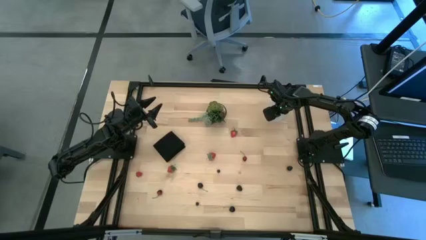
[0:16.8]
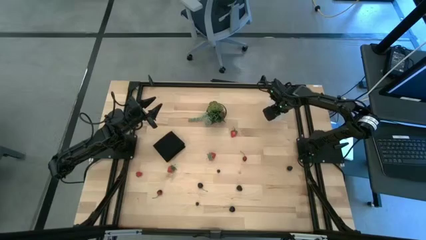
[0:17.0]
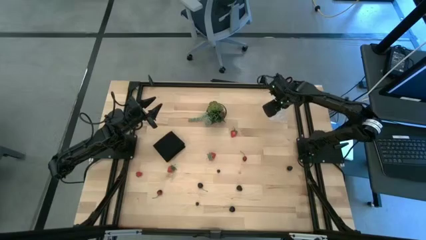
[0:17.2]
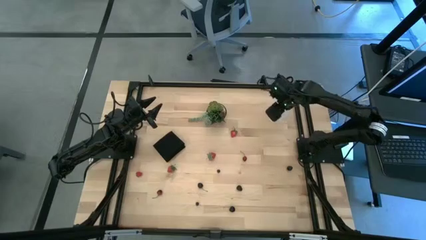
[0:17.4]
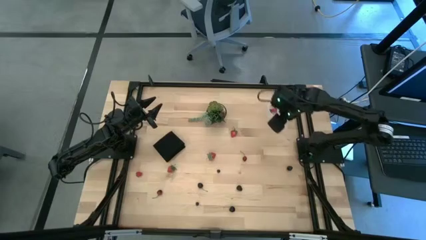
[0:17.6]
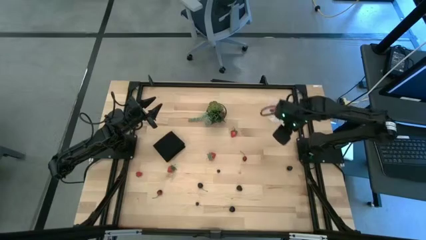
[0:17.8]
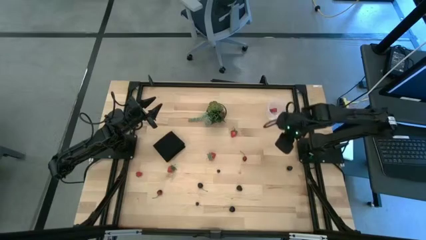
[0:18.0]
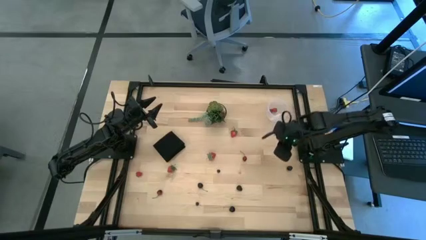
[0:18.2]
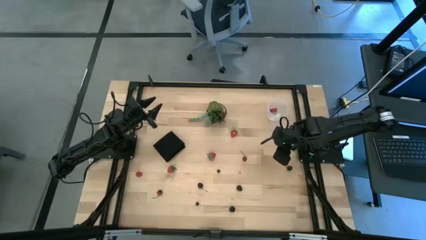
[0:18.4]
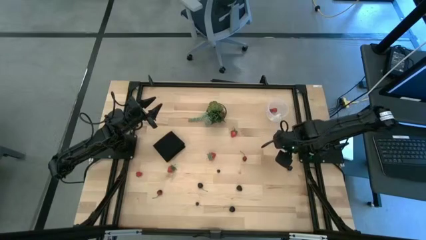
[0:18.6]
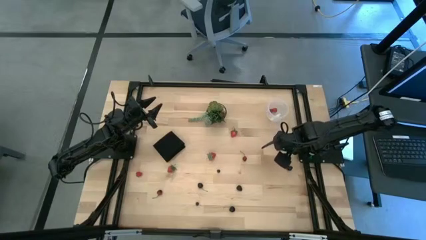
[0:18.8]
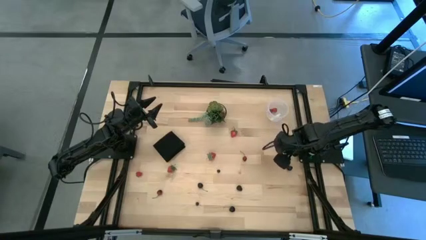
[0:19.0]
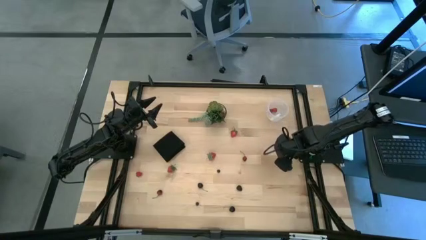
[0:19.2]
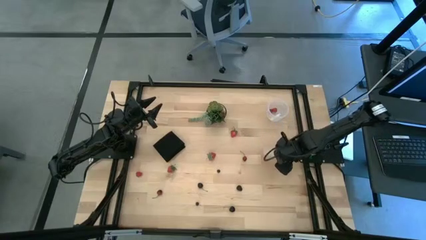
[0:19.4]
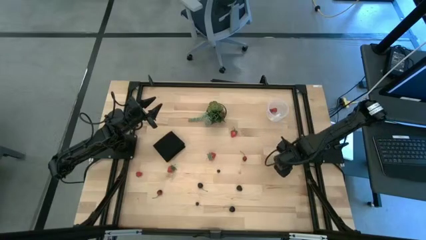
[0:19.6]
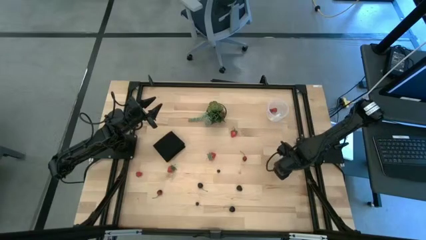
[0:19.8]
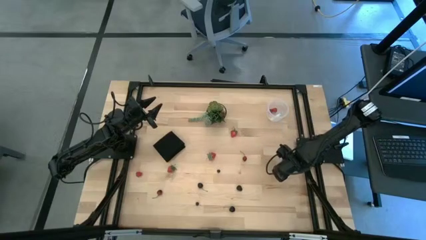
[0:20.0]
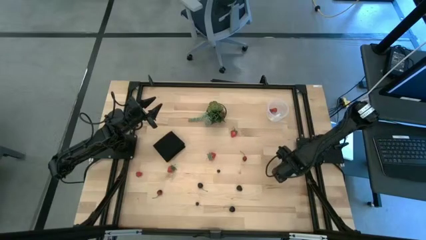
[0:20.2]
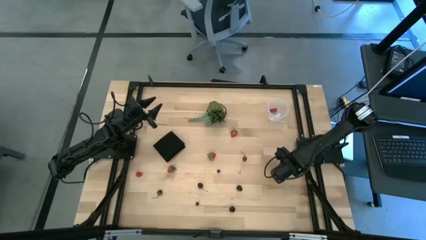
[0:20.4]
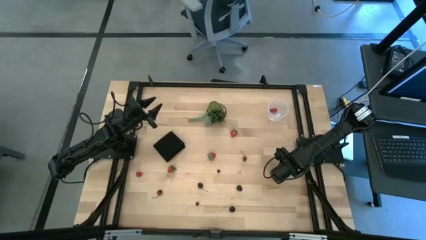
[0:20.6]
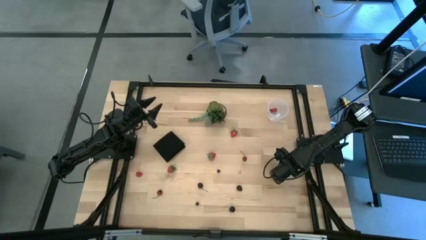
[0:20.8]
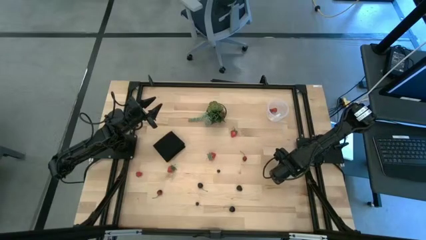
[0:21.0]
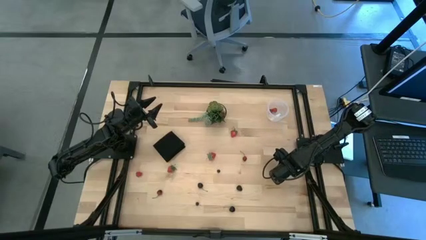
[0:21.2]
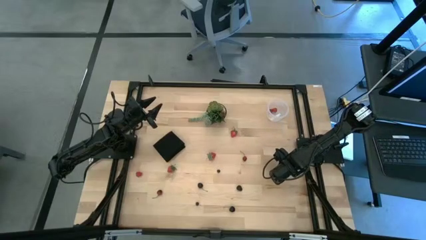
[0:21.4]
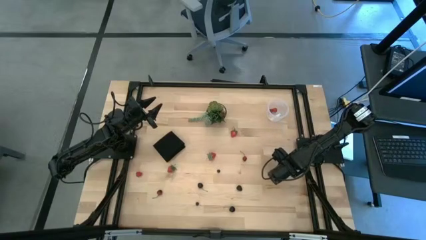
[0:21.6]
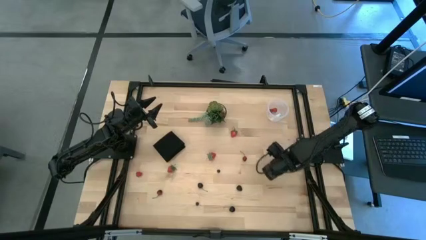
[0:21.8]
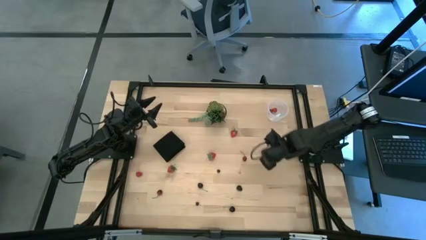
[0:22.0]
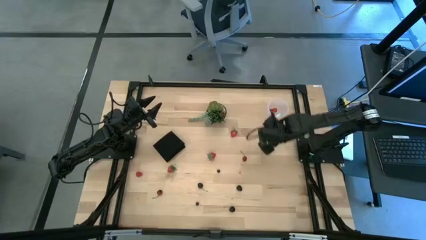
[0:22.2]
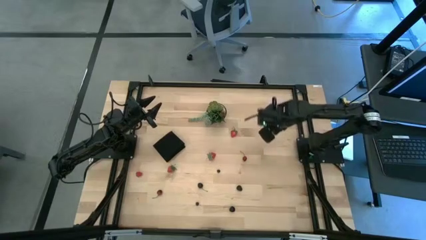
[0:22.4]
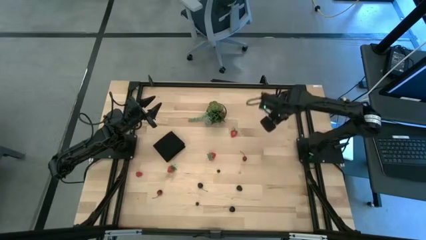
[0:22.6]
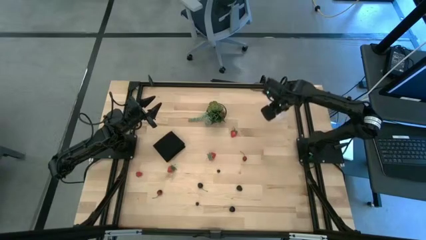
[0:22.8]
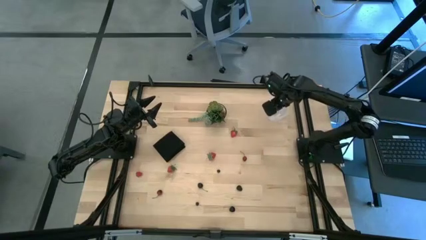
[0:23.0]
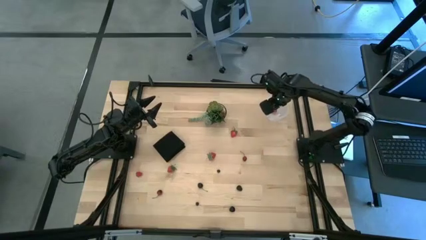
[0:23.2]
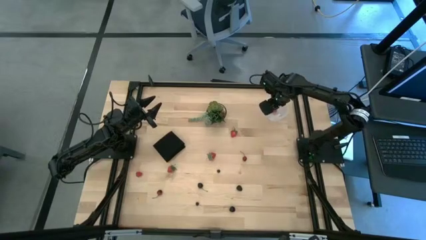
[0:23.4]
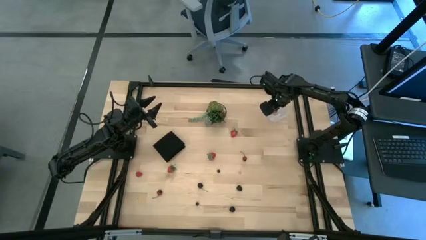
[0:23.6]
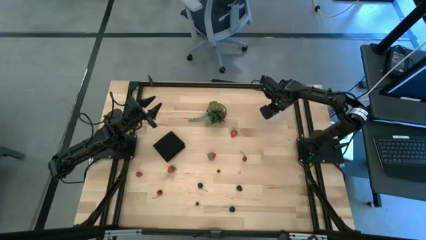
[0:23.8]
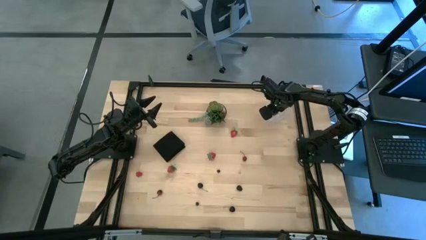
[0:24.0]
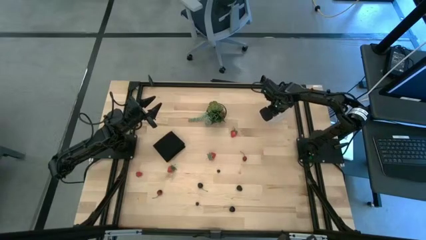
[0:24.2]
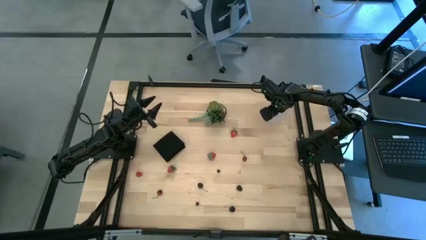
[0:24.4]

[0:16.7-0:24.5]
Task: Pick and placing Produce into tupperware
Put the right blackberry into the bin

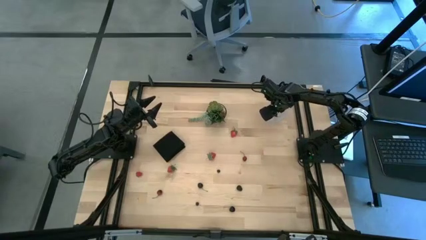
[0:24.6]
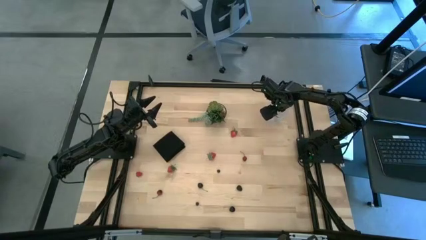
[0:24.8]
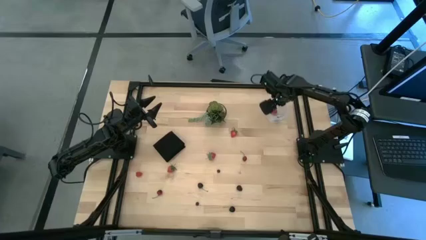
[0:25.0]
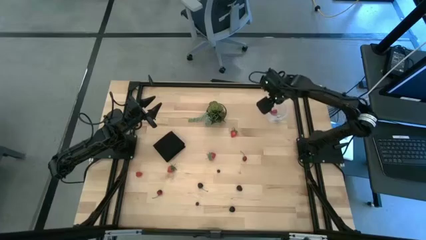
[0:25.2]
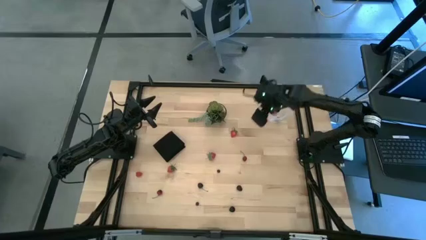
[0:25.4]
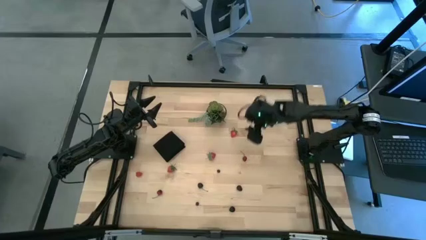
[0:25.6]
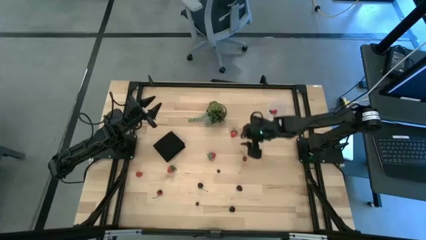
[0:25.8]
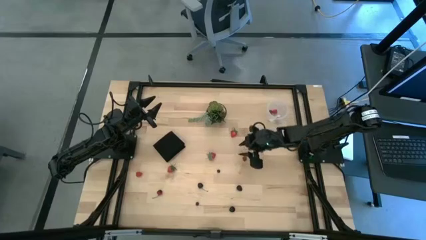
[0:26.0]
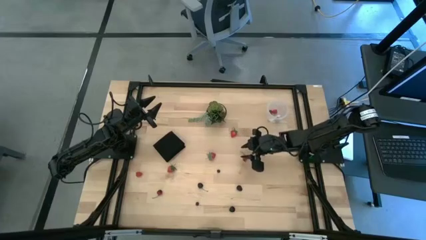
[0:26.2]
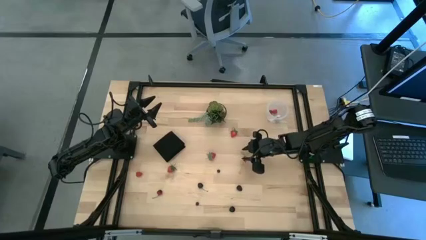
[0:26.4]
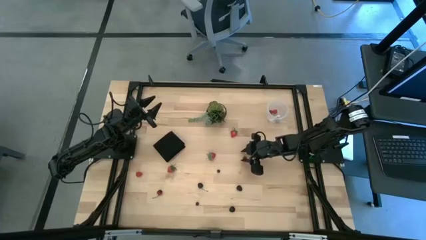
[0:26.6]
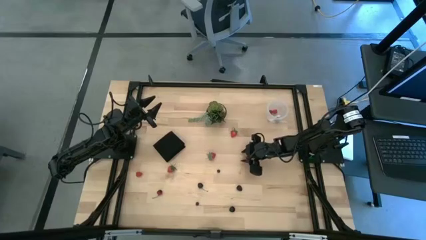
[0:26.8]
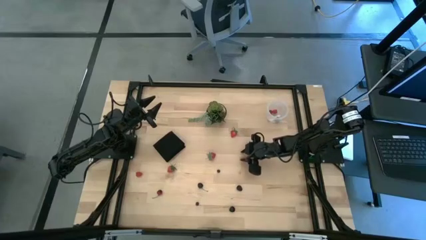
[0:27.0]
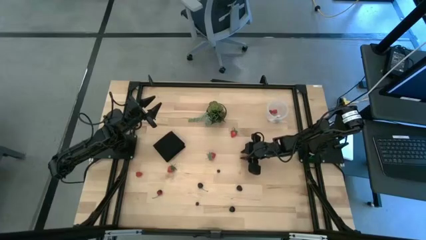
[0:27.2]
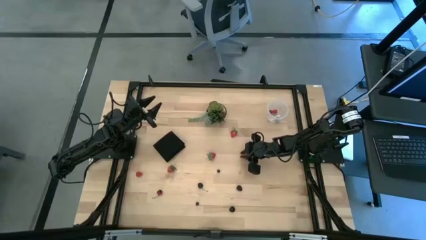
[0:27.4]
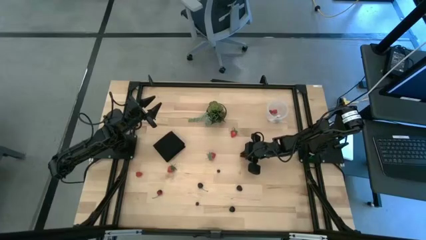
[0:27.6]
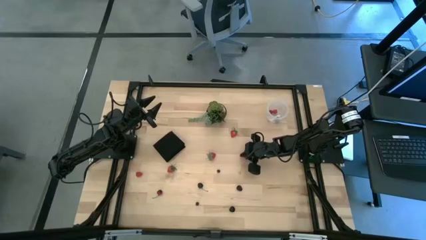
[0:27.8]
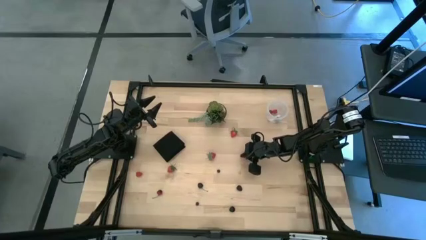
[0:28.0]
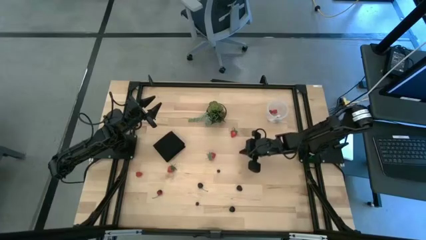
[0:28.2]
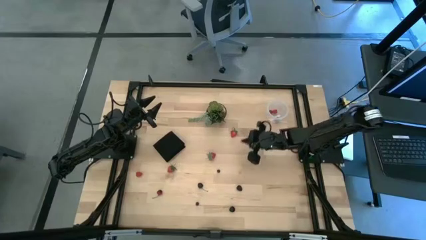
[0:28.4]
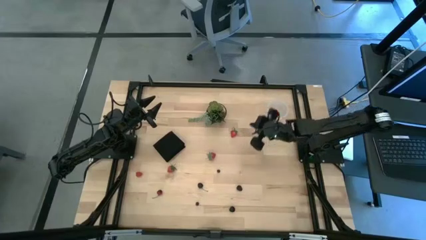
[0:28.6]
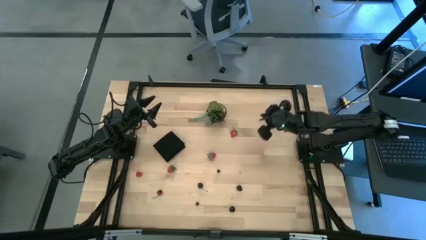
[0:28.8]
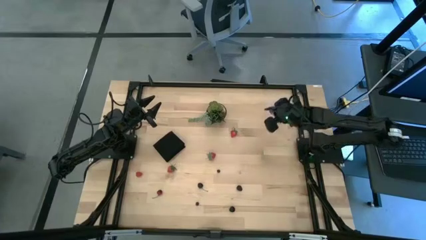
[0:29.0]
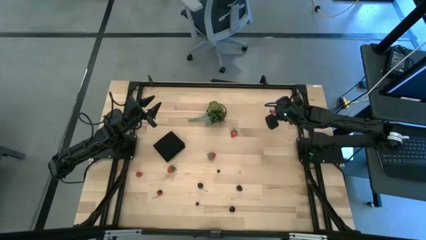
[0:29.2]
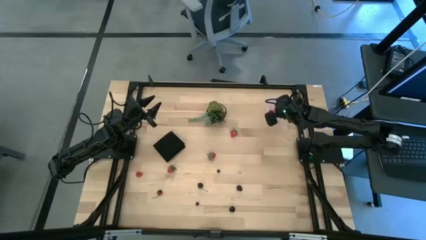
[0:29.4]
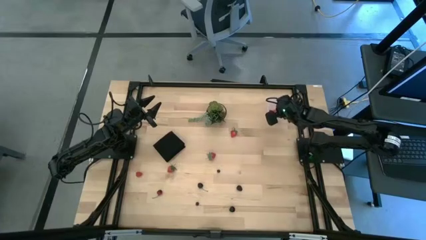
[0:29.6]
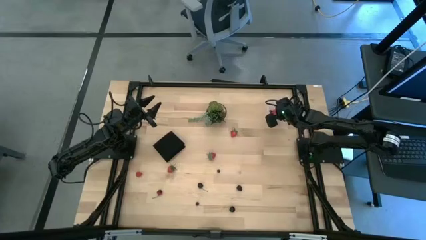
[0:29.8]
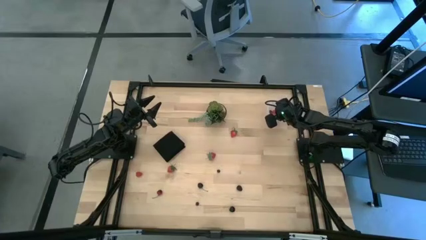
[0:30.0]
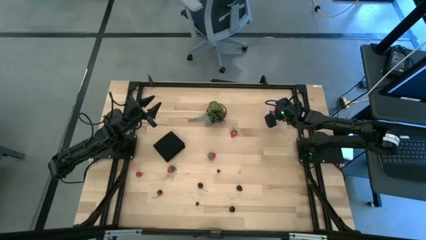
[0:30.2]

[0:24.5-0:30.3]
Put the right red cherry into the bin

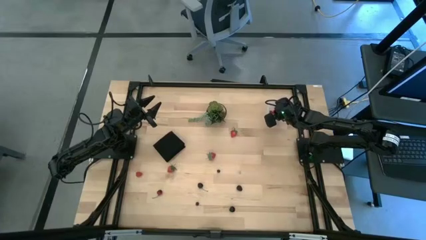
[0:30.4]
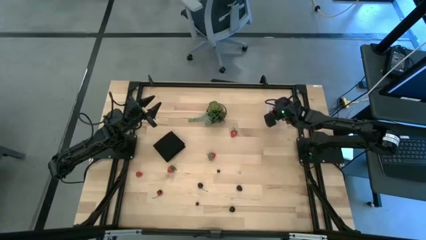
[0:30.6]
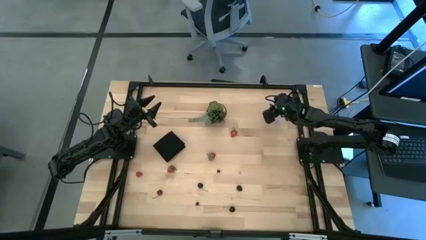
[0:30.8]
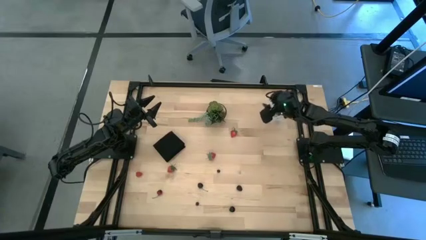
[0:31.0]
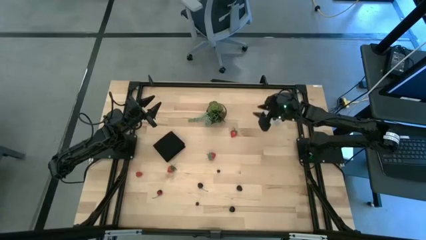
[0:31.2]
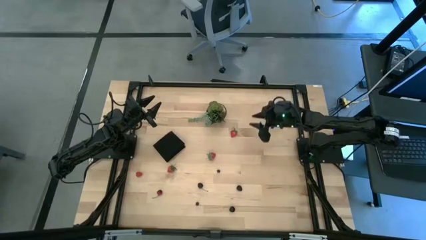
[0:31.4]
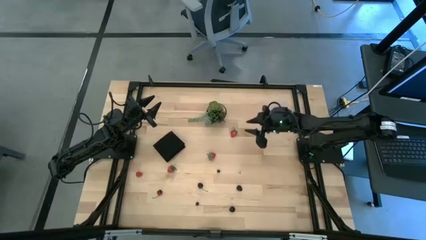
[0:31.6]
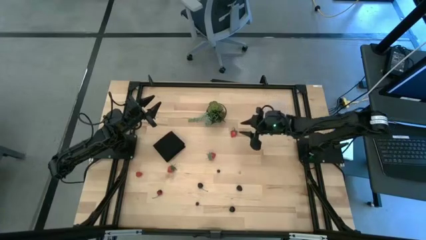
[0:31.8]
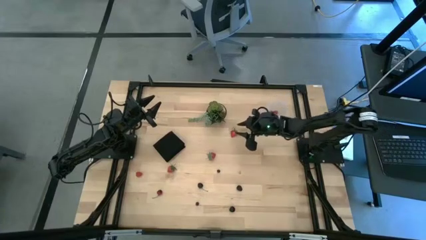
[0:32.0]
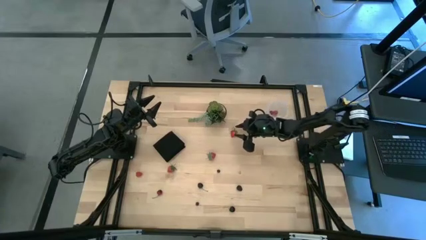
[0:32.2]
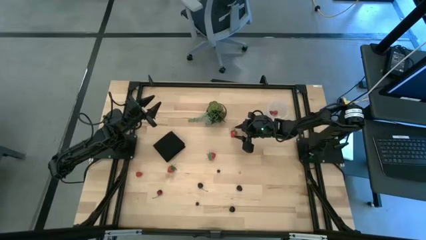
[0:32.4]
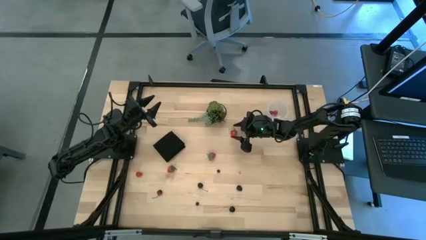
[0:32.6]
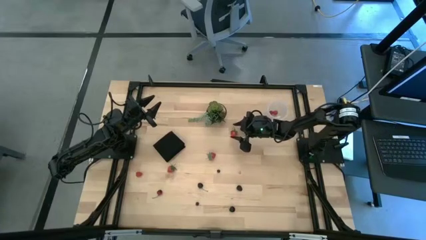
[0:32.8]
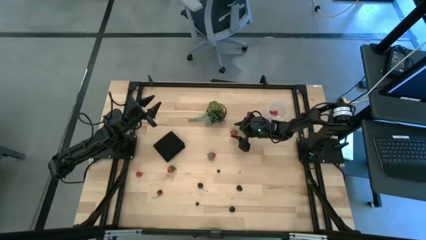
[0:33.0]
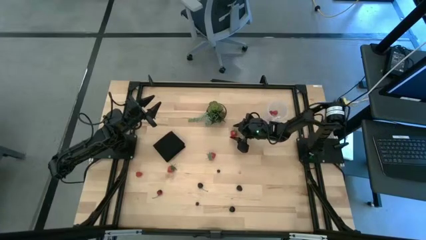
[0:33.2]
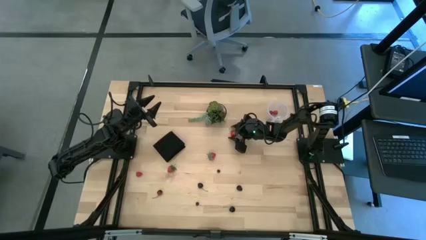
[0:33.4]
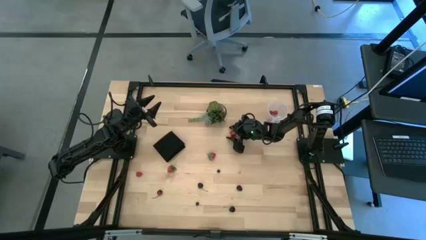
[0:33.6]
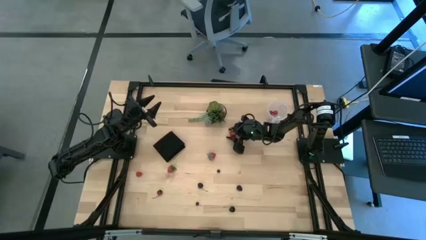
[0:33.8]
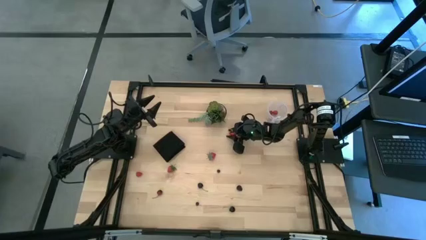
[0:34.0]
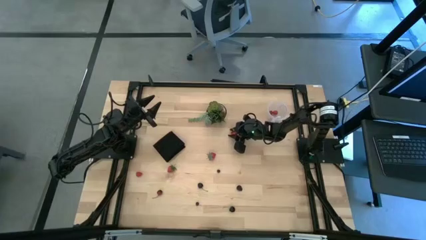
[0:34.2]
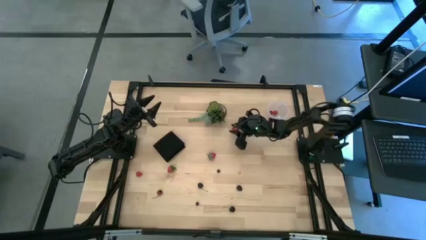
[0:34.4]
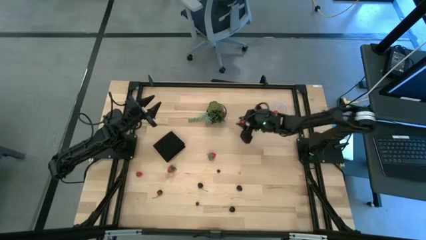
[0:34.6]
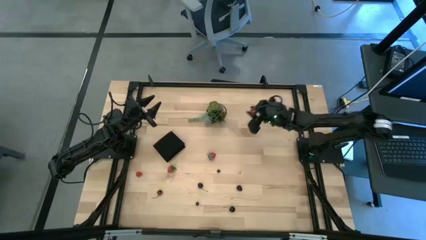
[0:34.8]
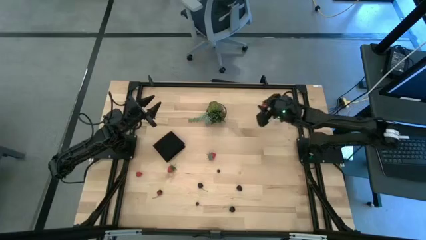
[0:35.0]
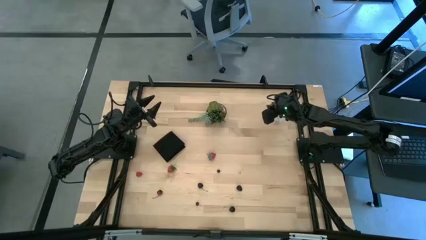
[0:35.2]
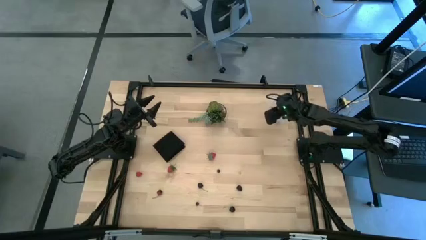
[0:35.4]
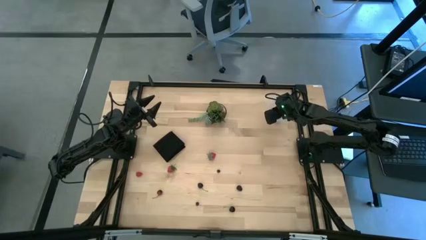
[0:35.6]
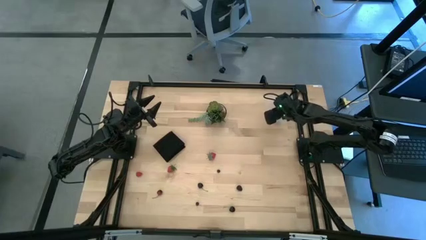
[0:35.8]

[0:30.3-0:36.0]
Put the top red strawberry into the bin
